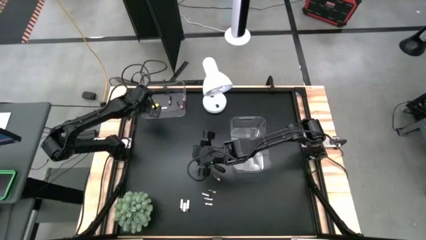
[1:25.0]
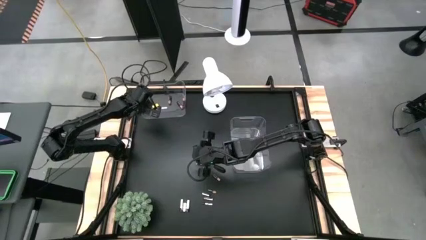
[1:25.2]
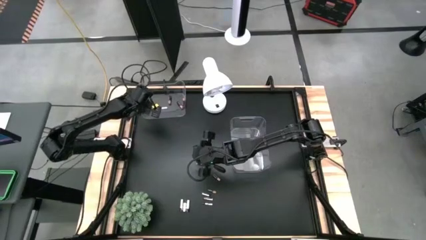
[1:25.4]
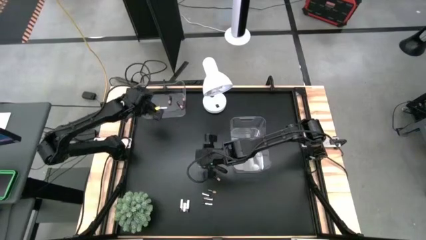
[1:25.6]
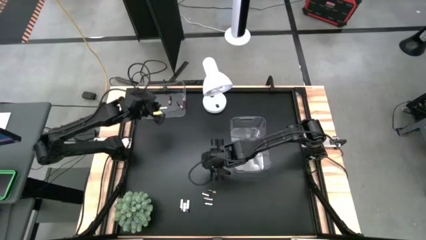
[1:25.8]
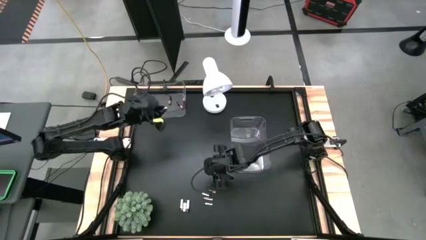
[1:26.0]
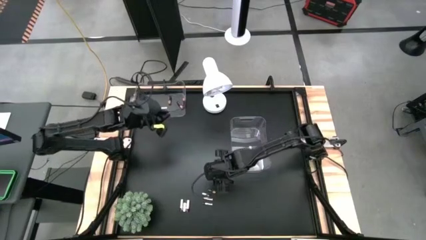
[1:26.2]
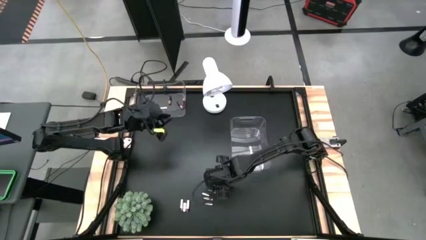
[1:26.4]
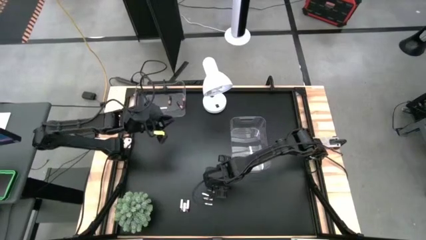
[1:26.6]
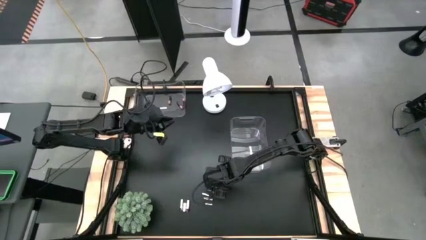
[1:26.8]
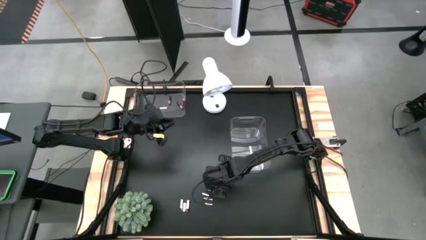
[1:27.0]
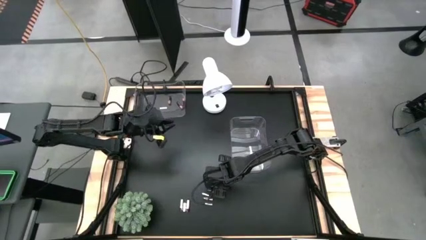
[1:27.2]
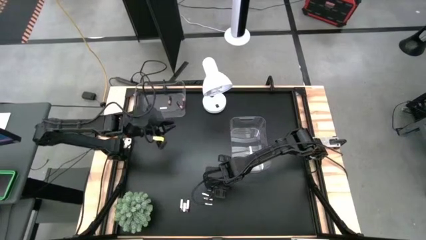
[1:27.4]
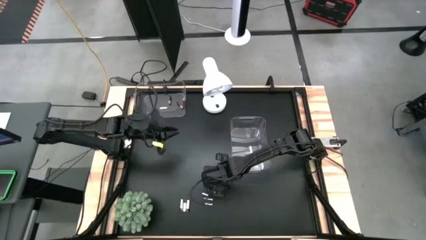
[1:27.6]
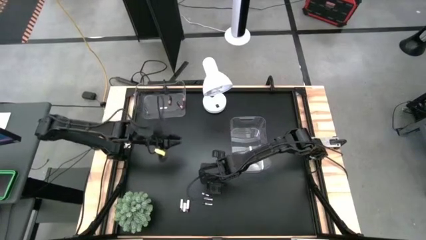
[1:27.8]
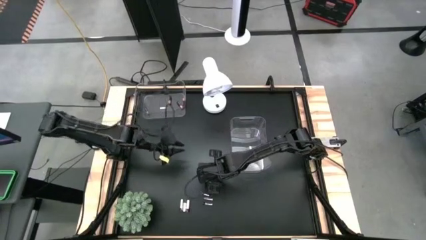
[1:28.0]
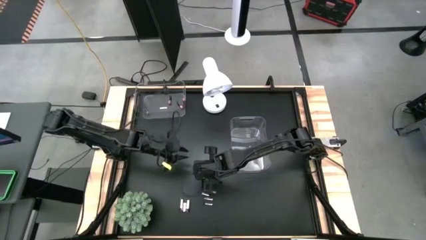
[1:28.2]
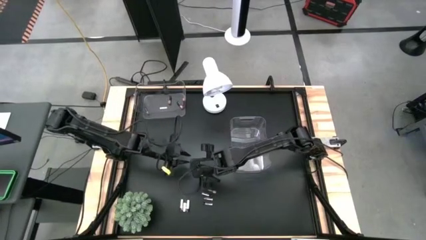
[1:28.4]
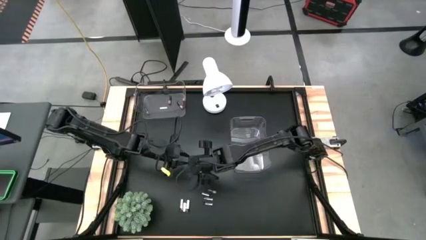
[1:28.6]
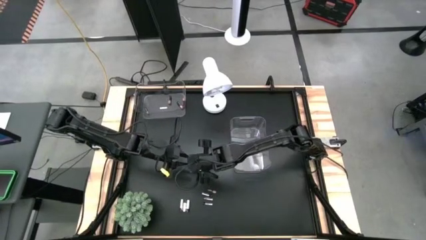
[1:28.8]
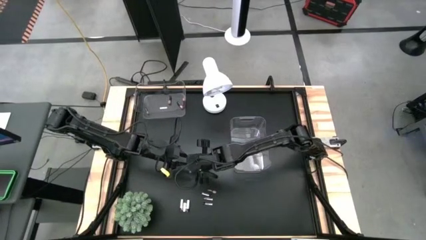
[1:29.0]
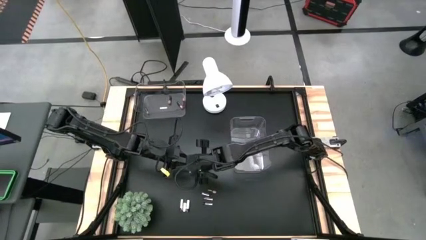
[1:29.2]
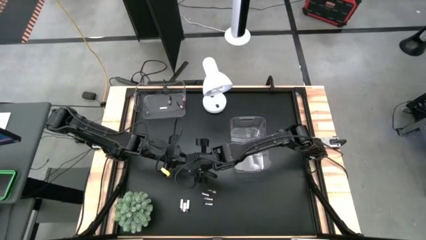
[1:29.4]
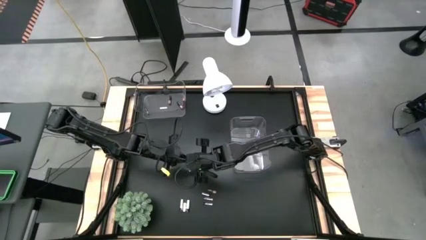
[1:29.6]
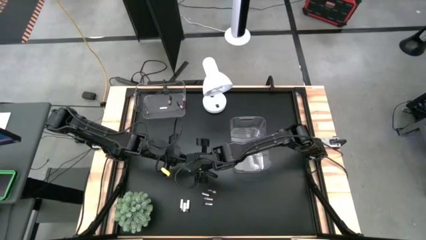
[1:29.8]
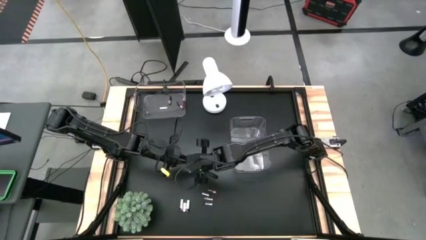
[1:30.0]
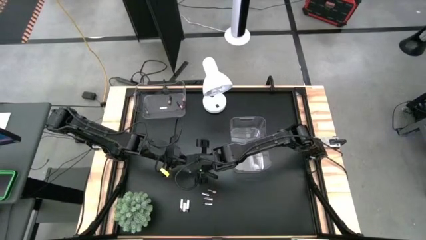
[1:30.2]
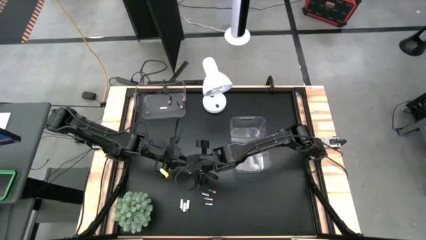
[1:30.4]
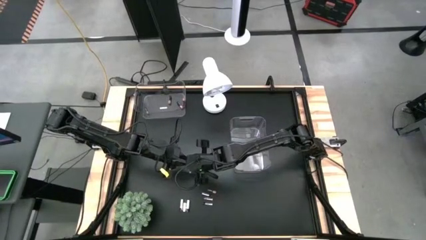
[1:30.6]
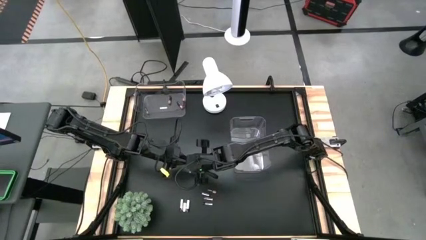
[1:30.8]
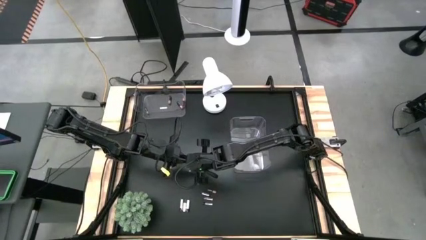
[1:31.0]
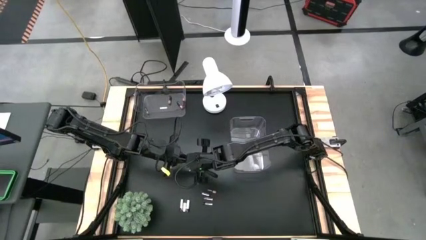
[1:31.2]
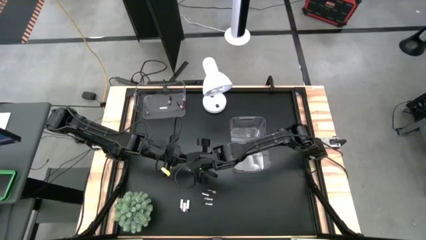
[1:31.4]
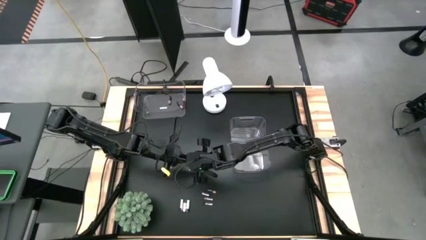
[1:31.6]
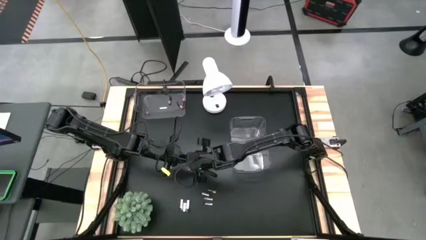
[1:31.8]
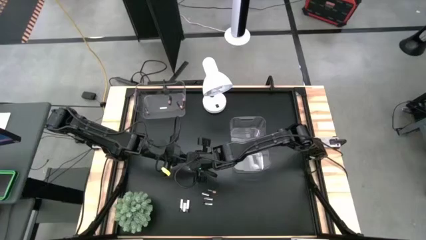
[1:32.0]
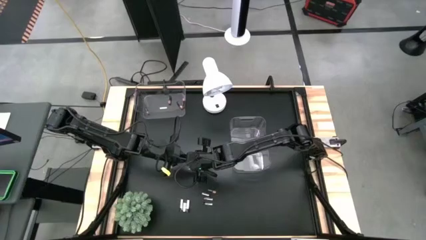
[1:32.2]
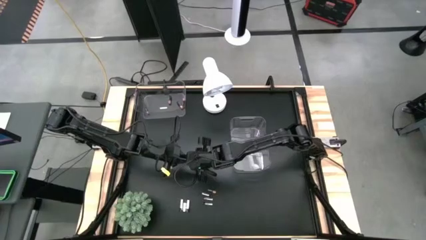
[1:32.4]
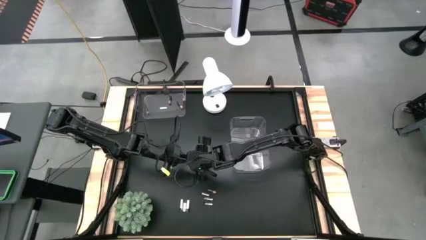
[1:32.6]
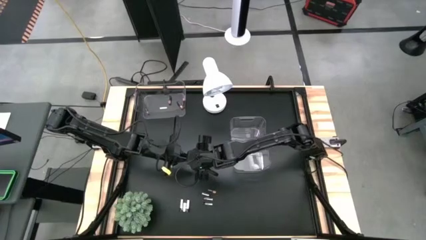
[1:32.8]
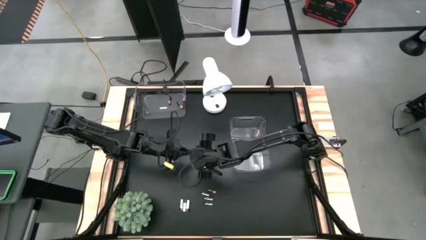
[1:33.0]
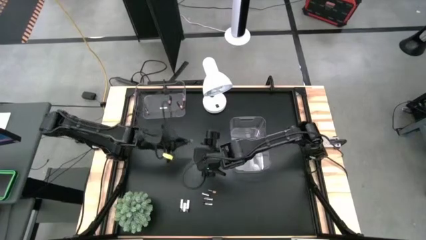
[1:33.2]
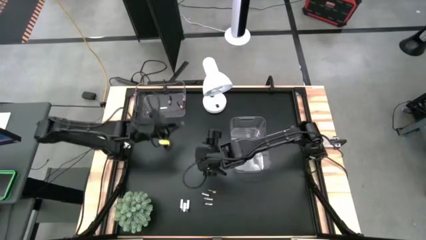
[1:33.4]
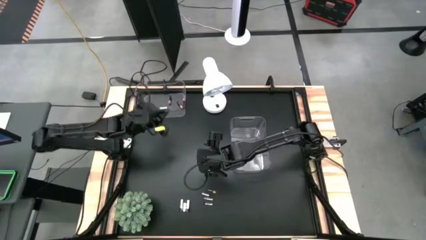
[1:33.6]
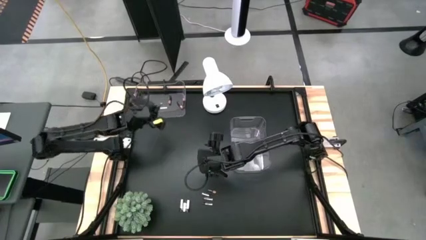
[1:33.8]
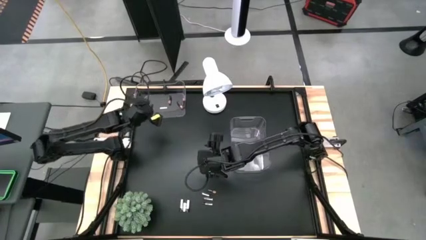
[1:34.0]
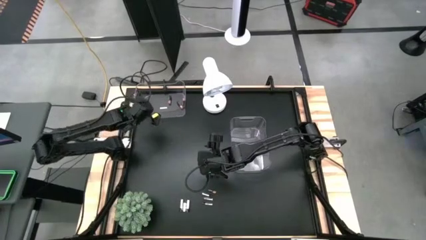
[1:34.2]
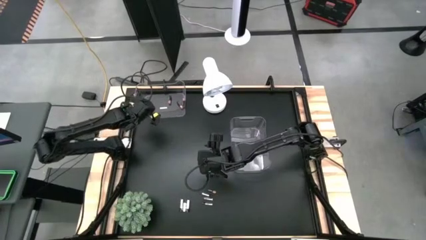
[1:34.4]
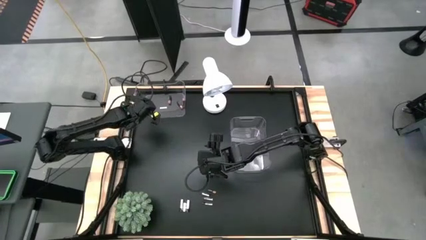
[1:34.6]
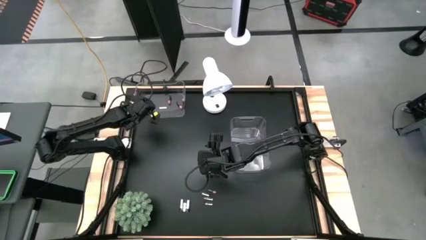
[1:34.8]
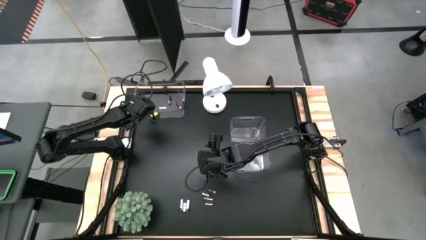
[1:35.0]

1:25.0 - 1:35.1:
Task: Sort batteries
Put the black battery into the top transparent bin

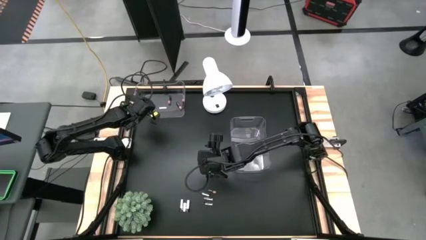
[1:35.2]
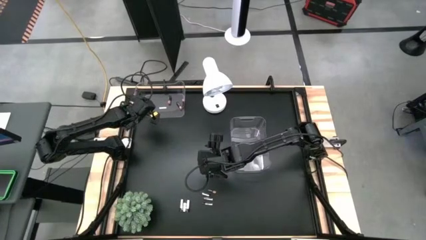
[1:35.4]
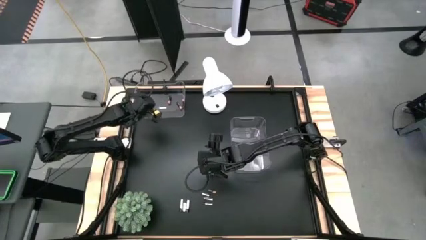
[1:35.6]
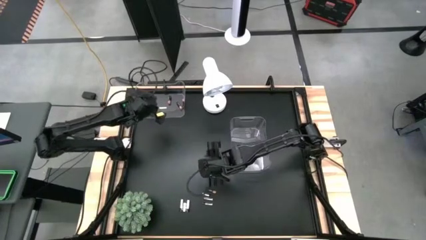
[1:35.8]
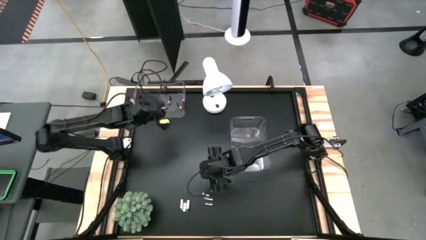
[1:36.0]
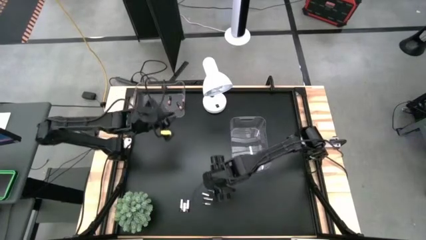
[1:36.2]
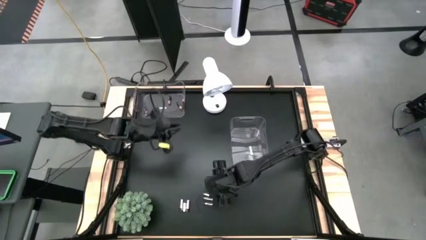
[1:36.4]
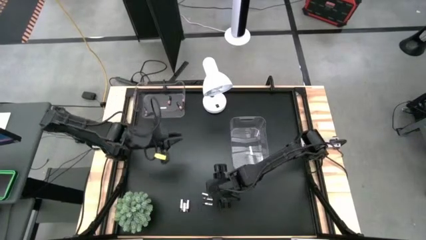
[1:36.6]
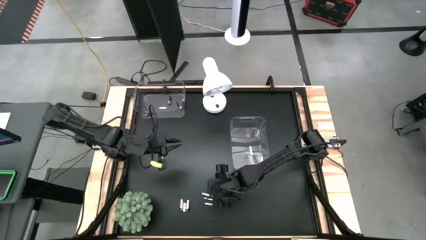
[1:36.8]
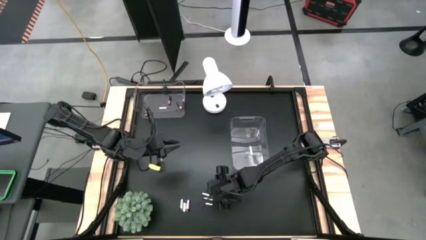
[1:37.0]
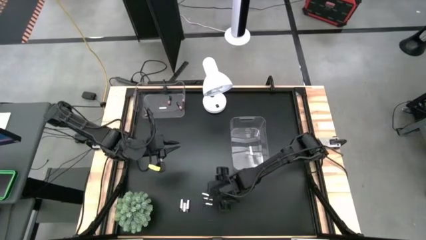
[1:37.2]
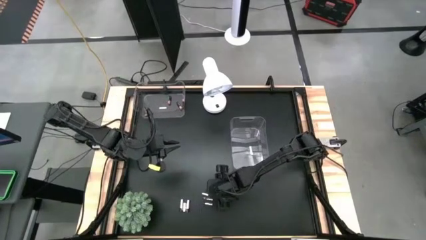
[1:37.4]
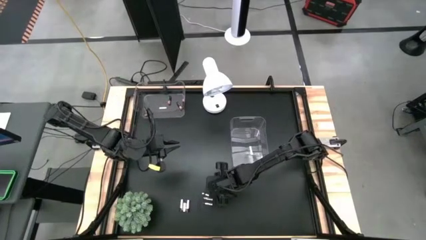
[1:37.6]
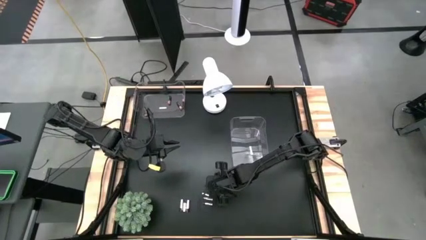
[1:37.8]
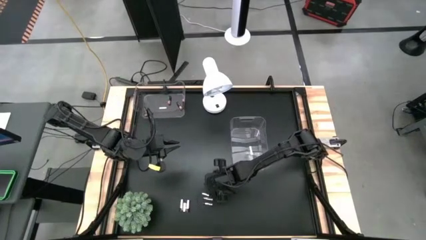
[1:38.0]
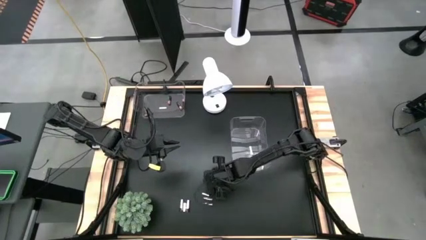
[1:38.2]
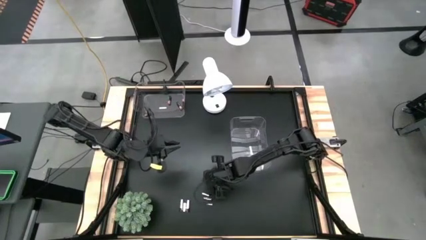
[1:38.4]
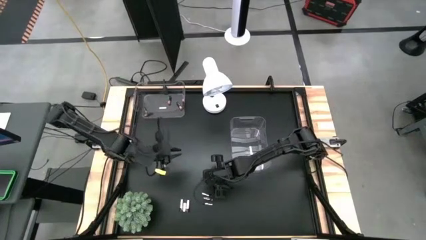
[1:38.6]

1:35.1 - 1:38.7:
Put the black battery into the top transparent bin
